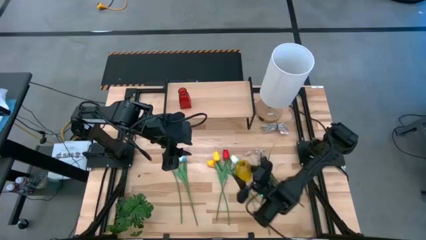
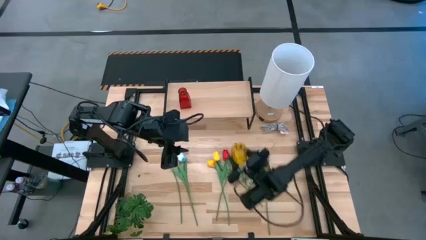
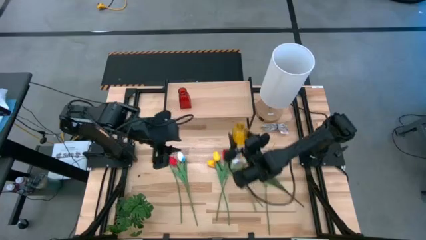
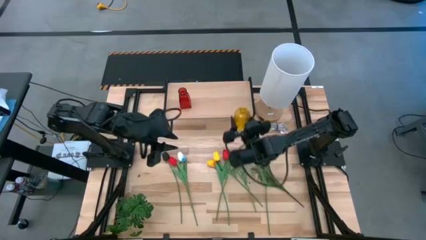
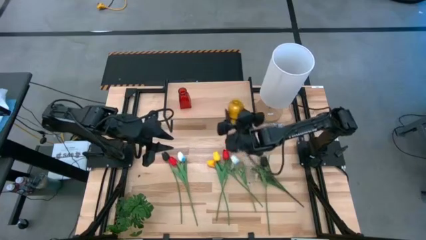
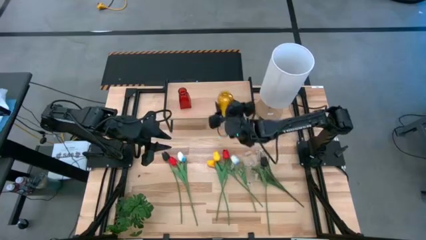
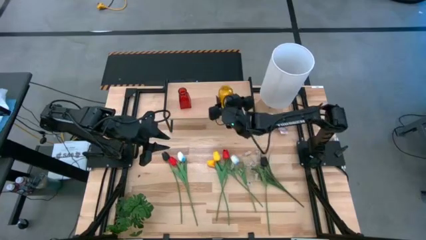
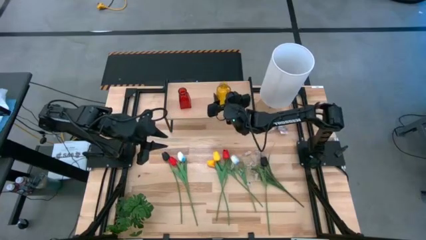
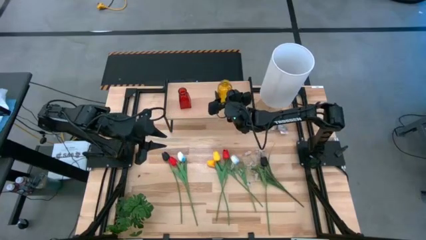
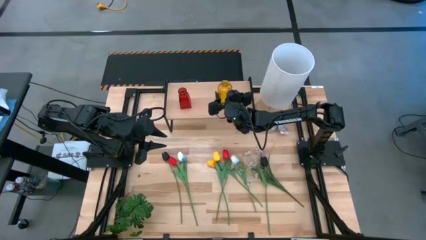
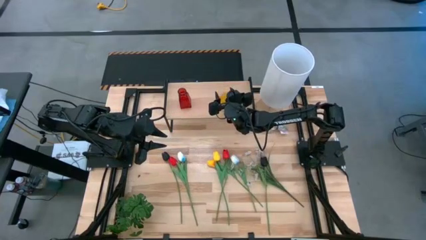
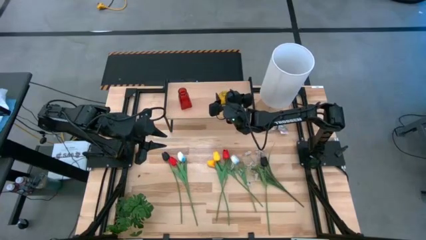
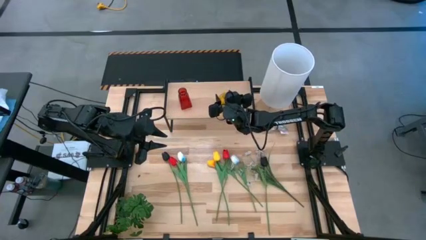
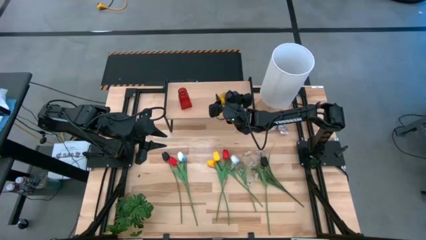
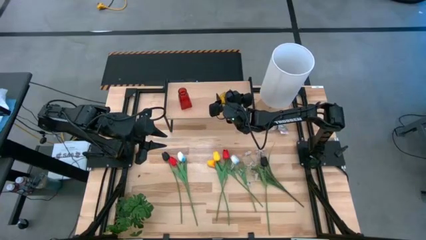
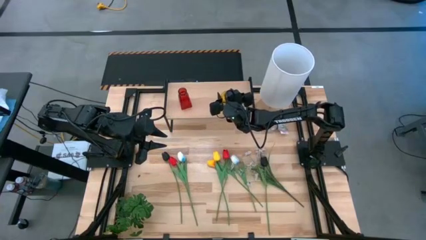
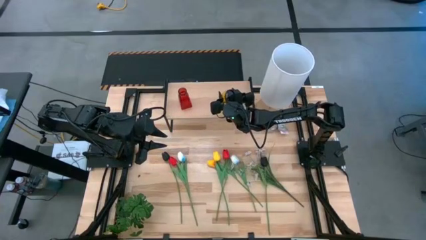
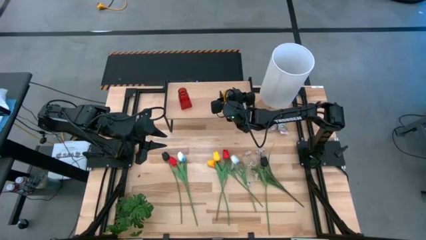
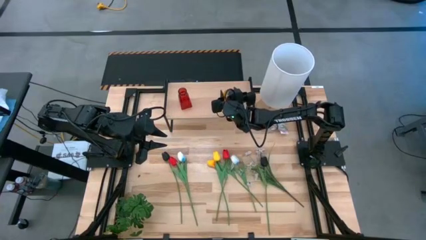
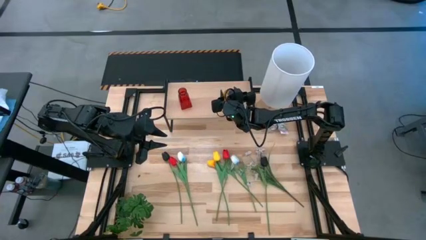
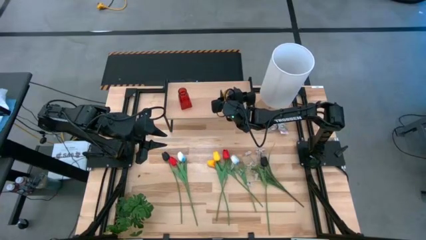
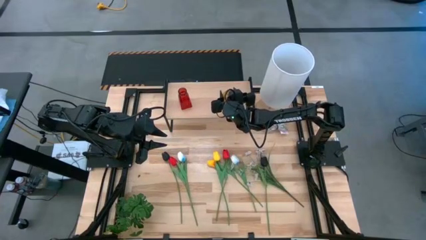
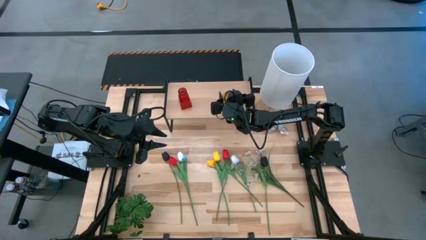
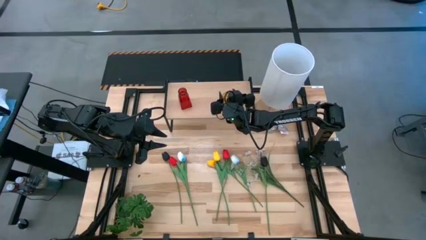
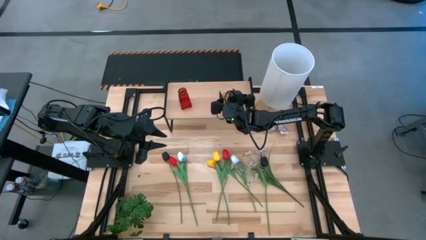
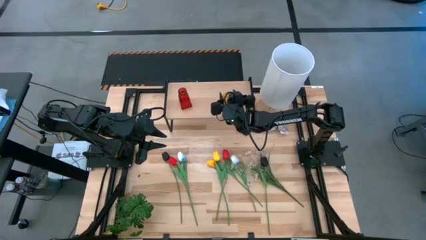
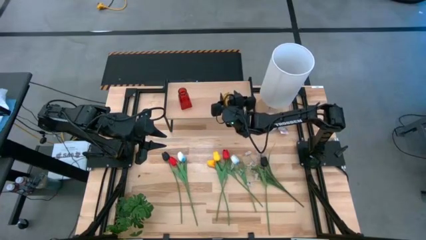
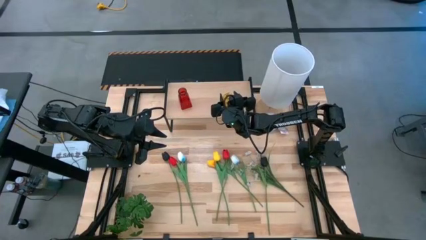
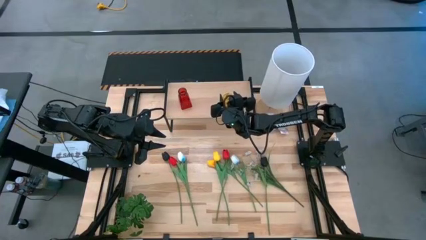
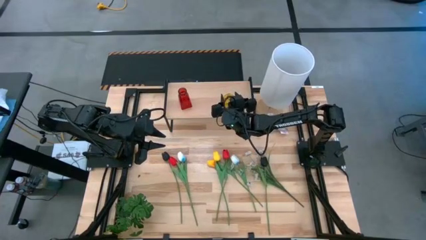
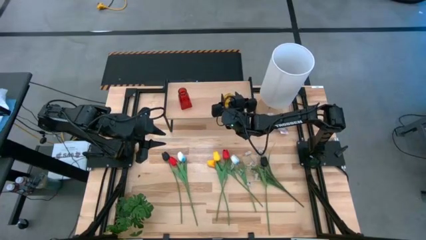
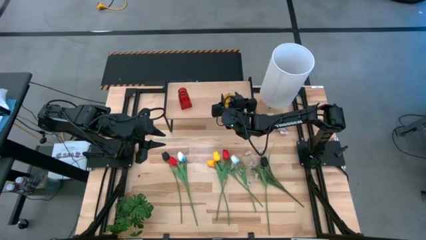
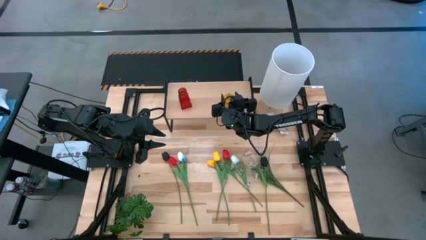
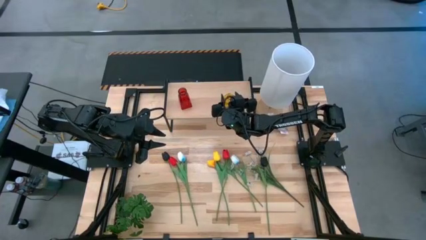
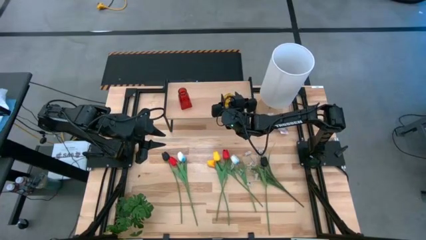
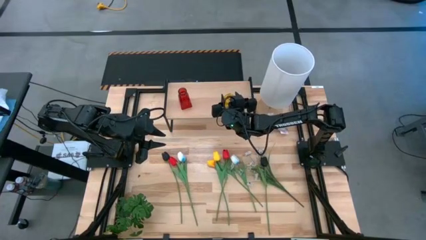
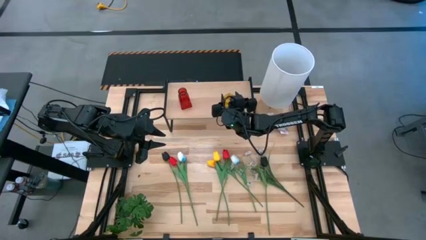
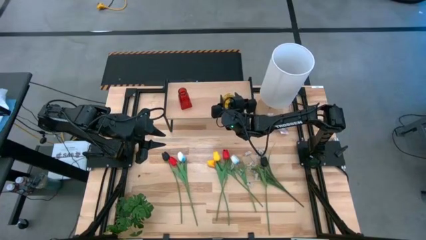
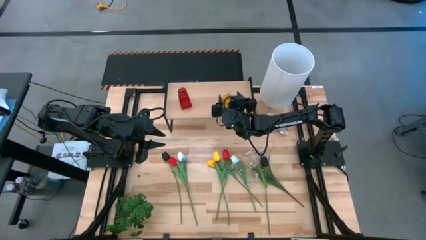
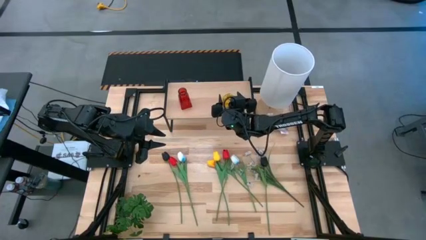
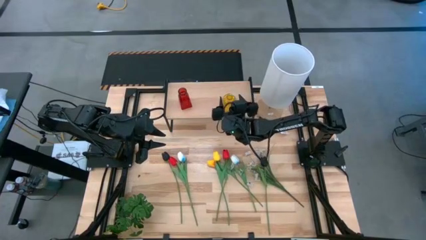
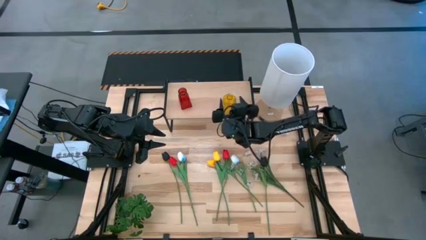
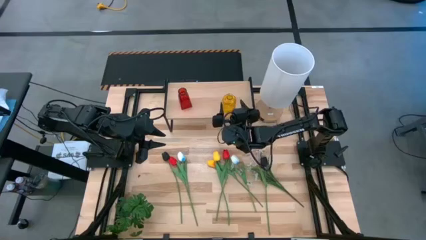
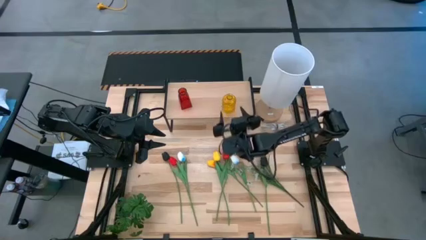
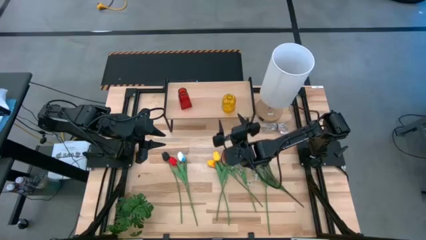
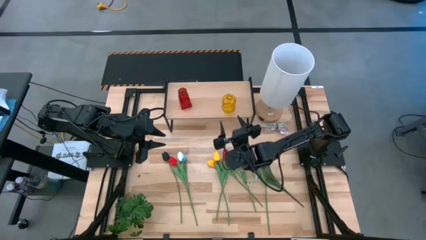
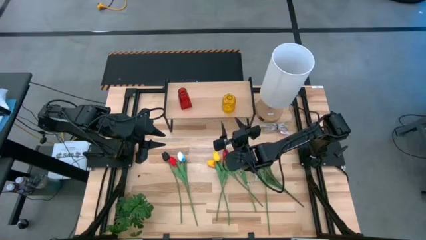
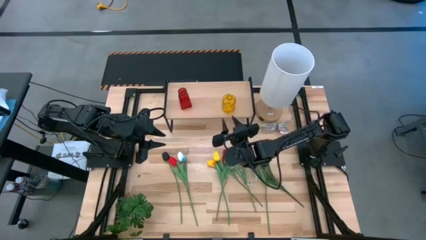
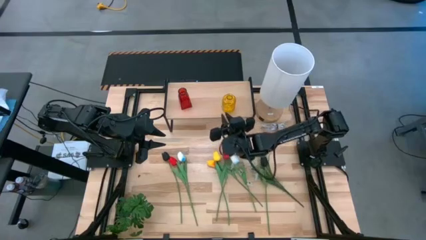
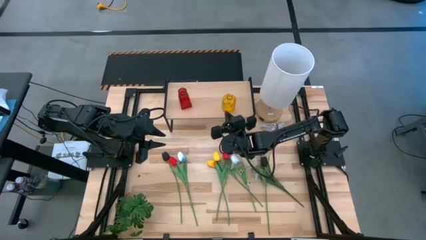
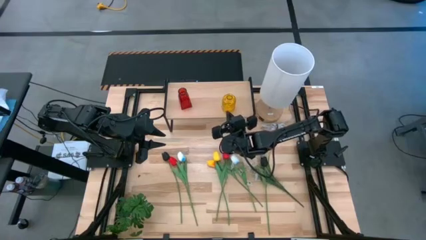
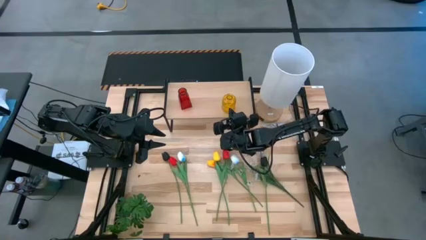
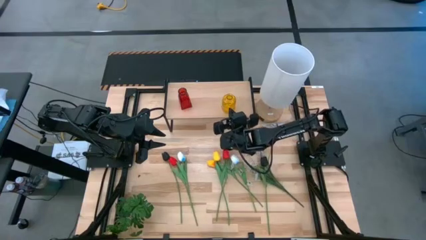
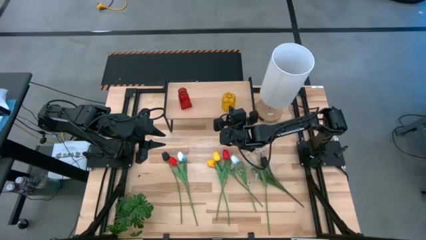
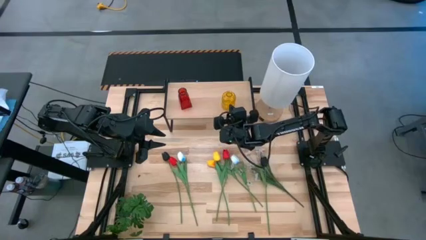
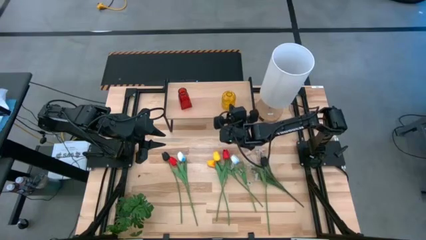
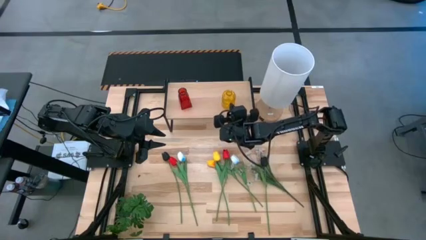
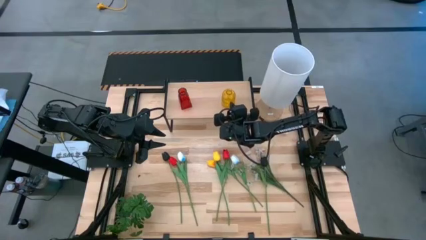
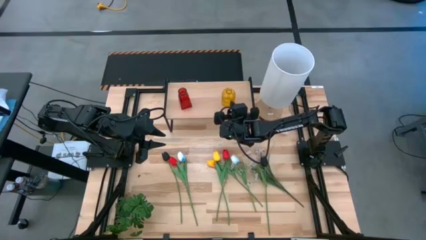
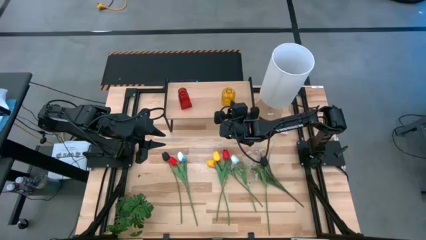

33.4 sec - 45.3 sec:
Task: Pick and place flowers into a vace then onto a shelf
Put the yellow flower vase on the shelf

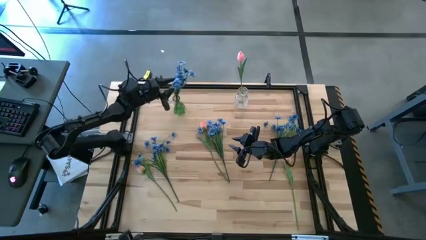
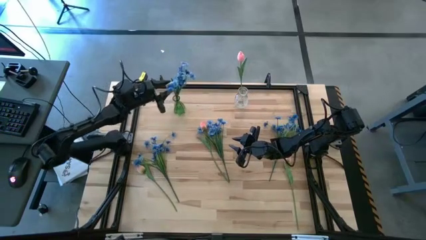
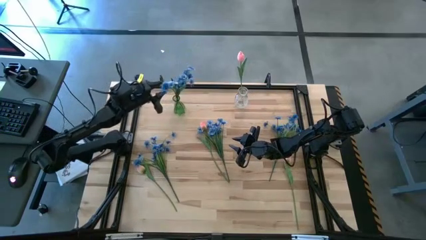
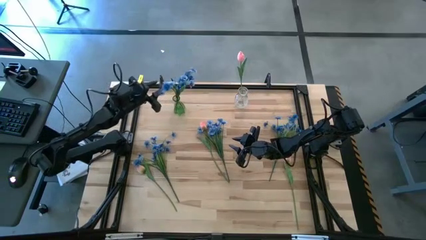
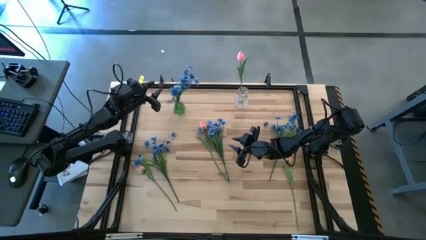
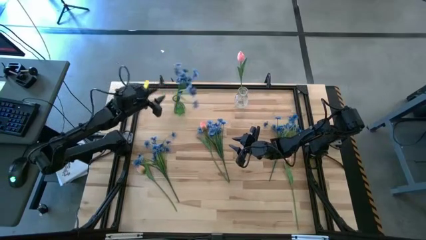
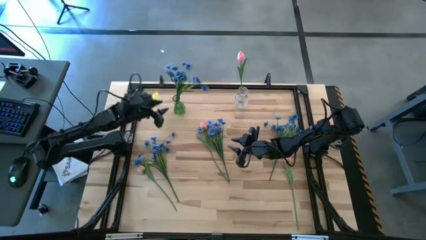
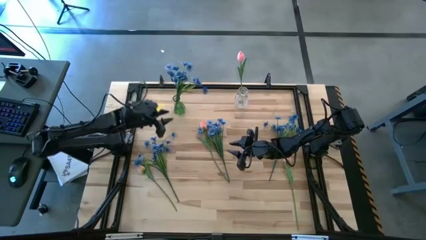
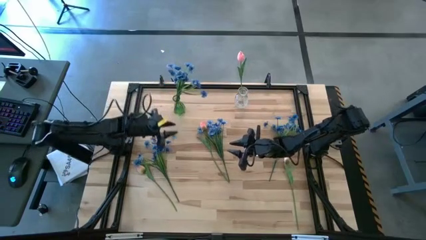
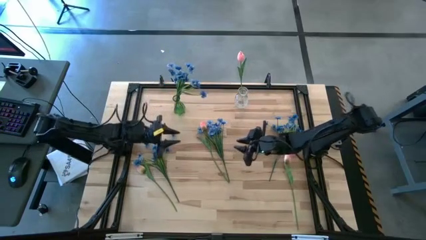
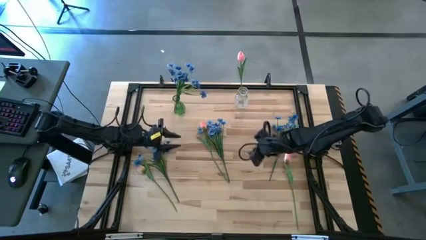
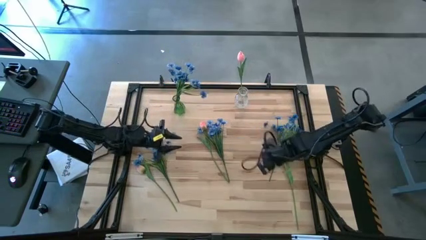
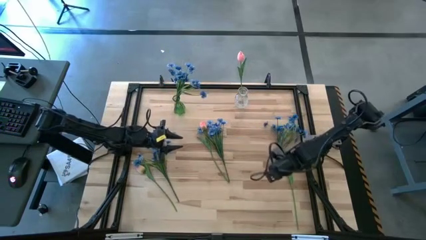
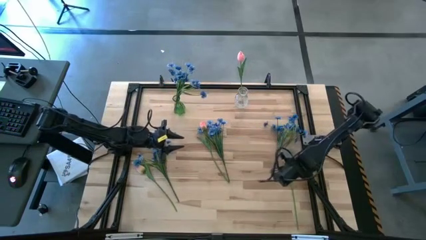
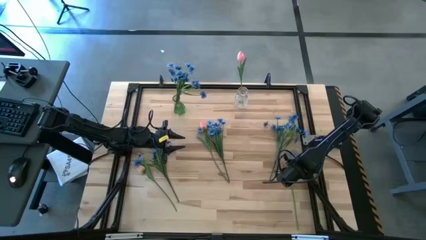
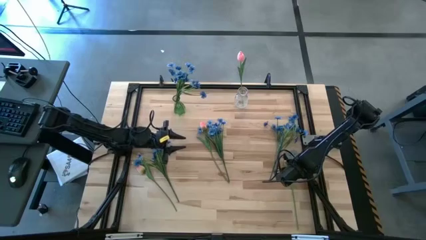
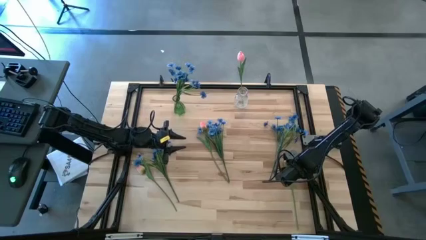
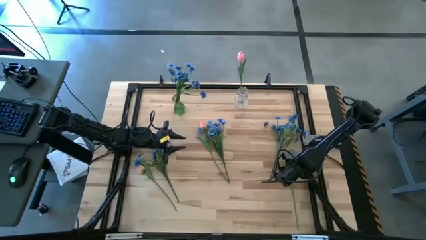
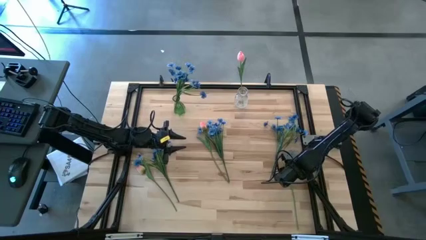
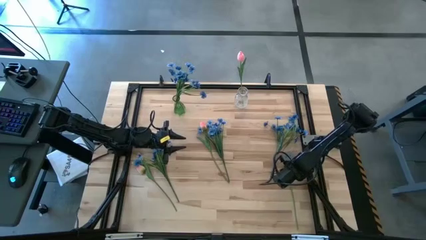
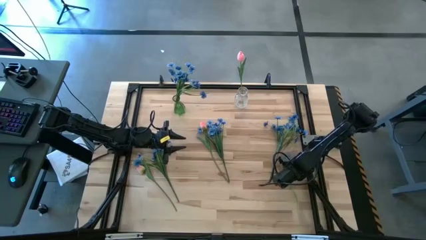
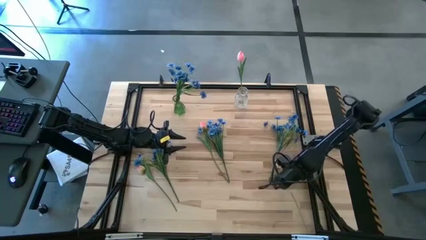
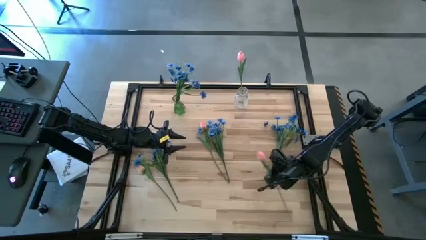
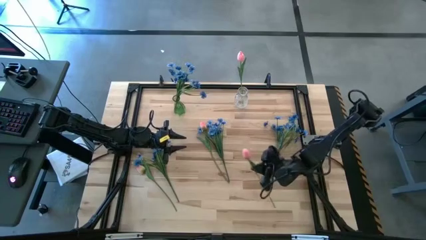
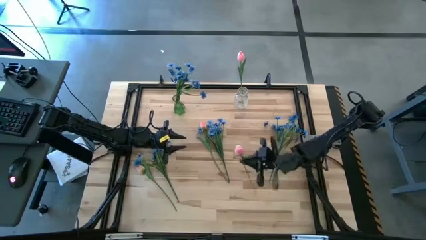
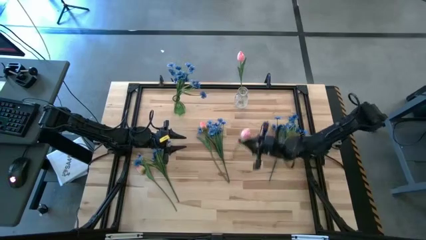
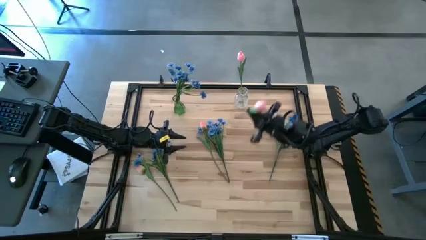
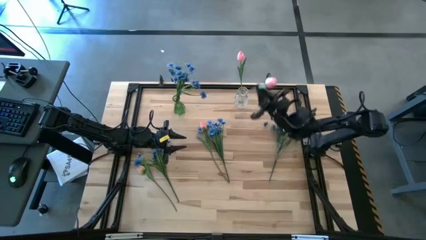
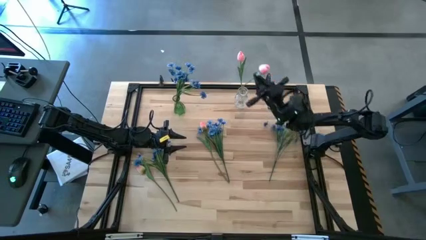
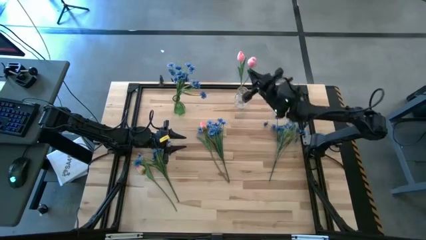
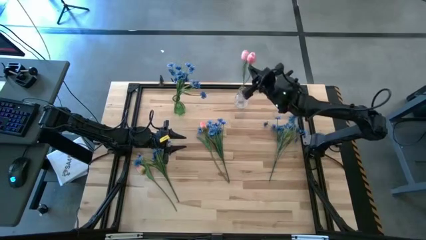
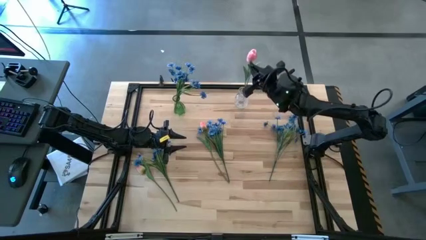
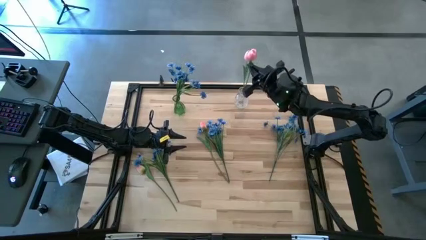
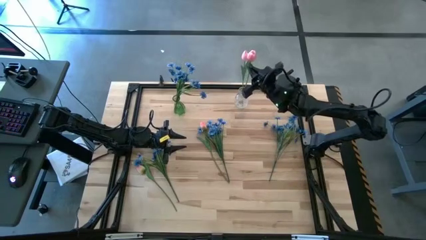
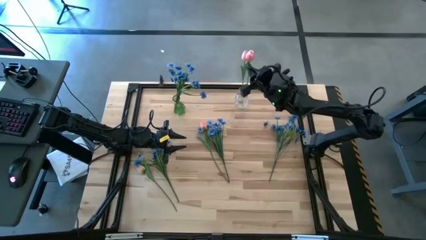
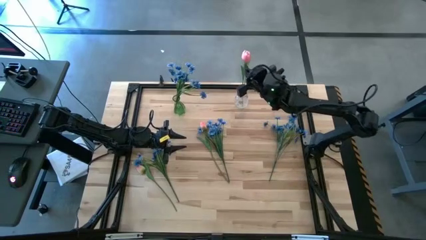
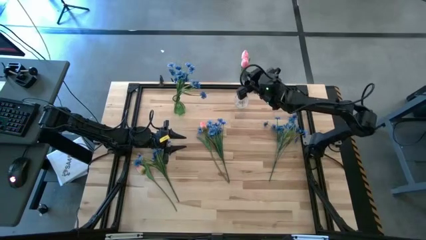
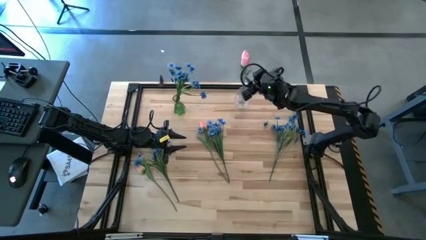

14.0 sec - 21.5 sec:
Task: Sort flowers into vase by color
Put the bottom right pink tulip into the transparent vase
